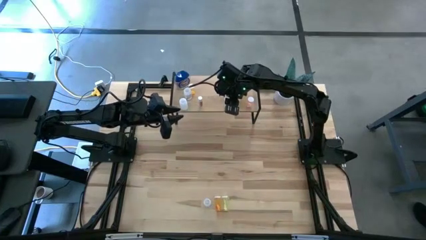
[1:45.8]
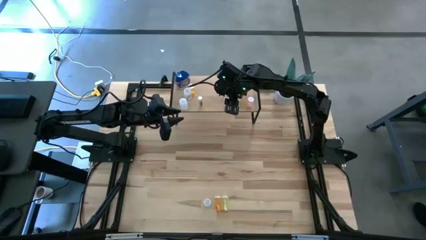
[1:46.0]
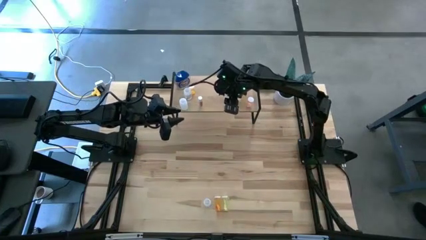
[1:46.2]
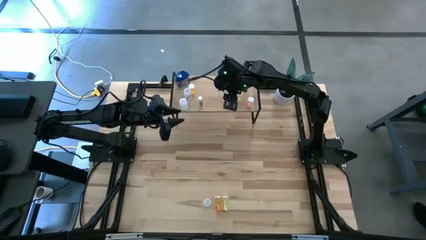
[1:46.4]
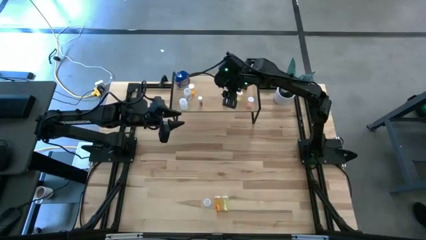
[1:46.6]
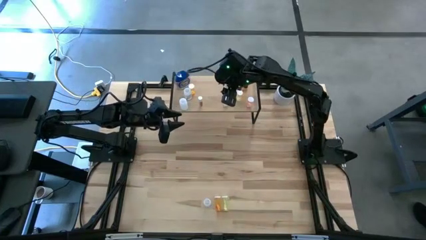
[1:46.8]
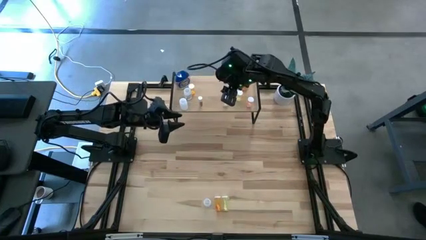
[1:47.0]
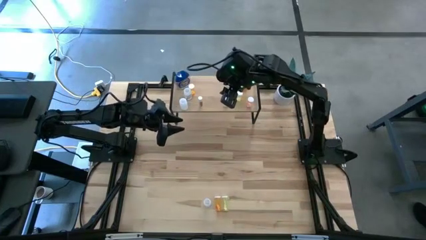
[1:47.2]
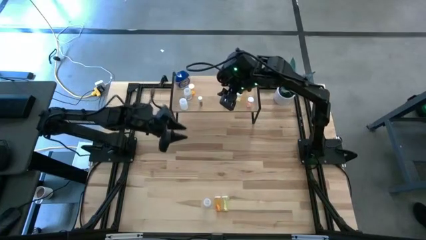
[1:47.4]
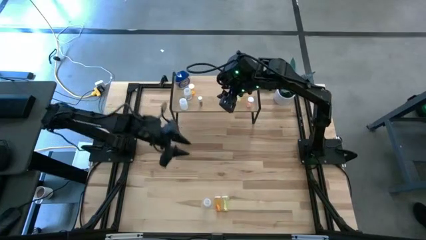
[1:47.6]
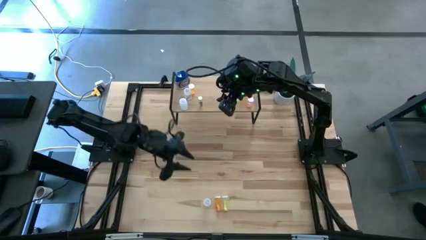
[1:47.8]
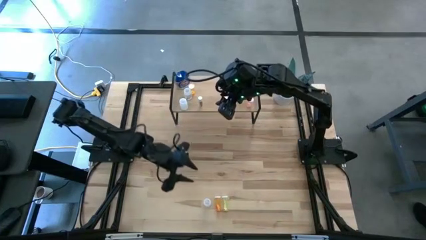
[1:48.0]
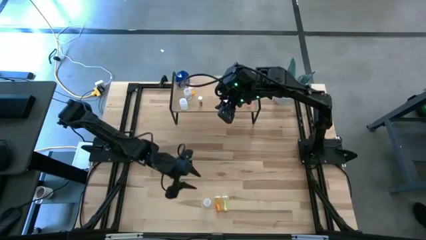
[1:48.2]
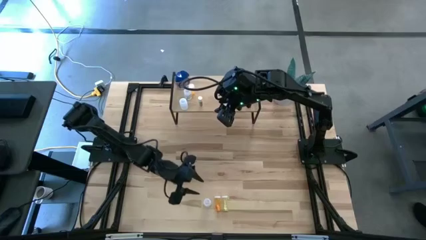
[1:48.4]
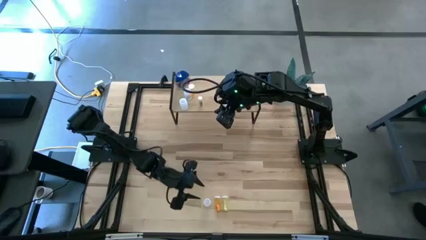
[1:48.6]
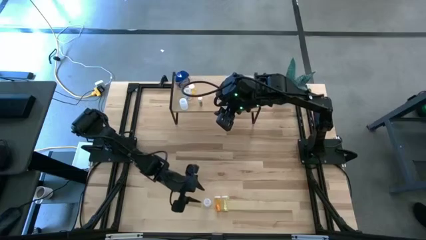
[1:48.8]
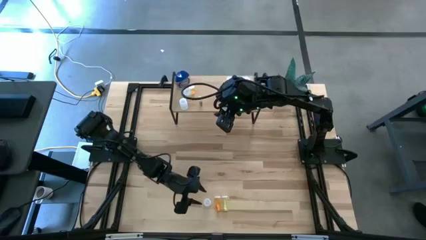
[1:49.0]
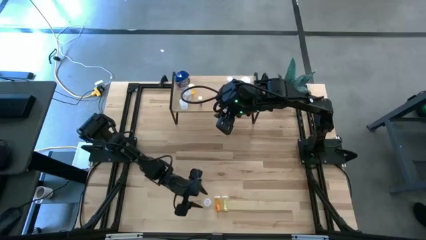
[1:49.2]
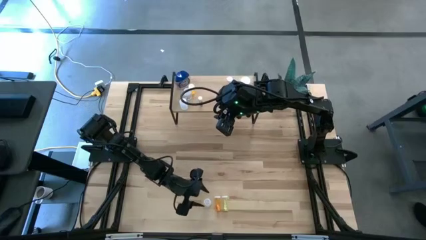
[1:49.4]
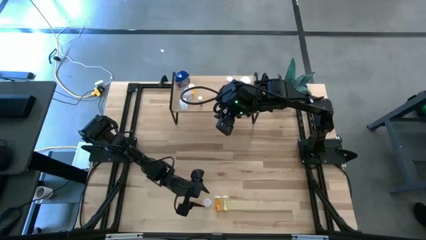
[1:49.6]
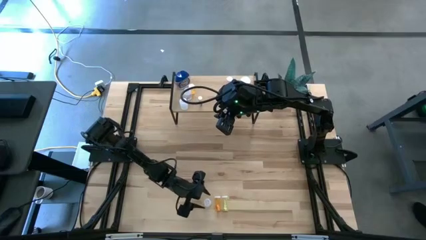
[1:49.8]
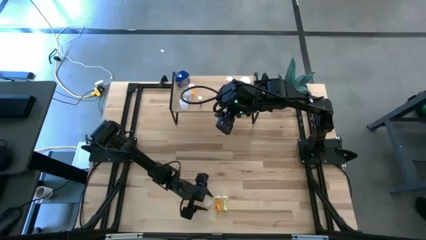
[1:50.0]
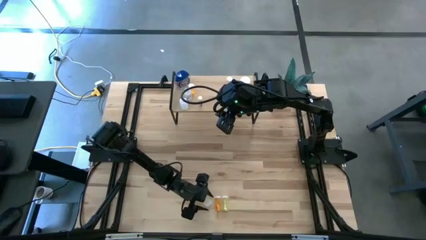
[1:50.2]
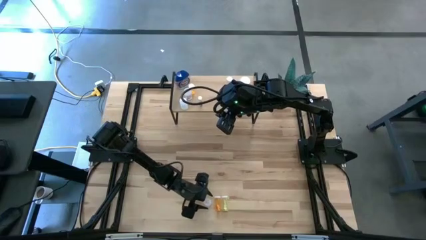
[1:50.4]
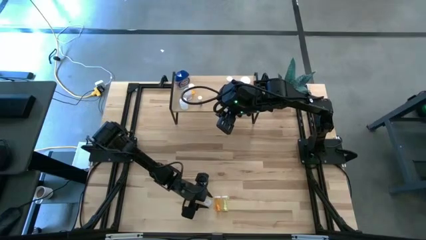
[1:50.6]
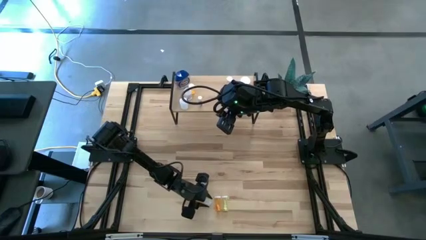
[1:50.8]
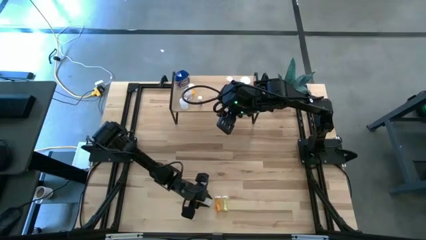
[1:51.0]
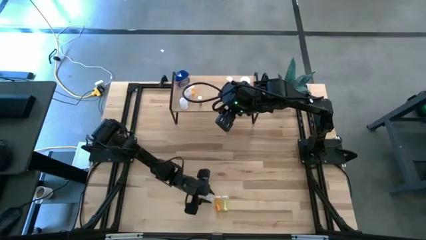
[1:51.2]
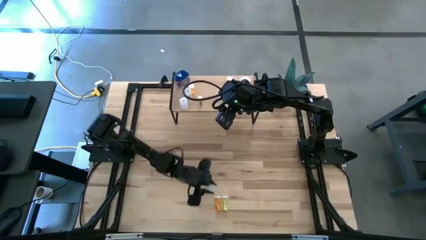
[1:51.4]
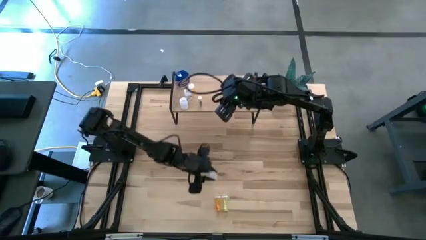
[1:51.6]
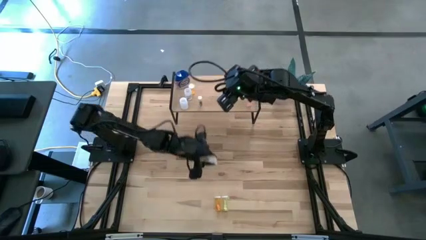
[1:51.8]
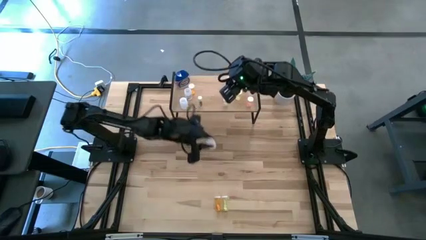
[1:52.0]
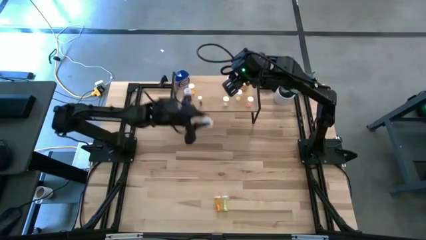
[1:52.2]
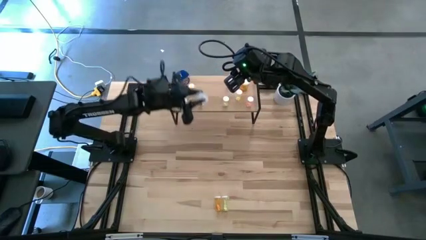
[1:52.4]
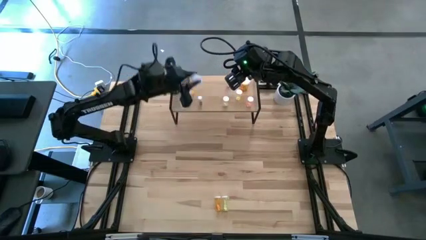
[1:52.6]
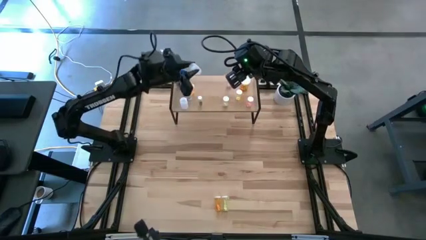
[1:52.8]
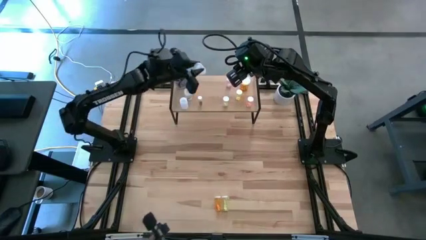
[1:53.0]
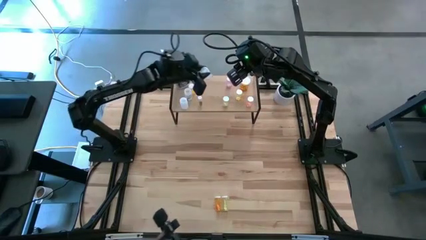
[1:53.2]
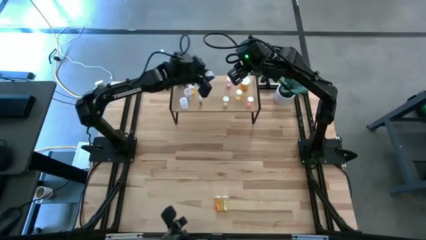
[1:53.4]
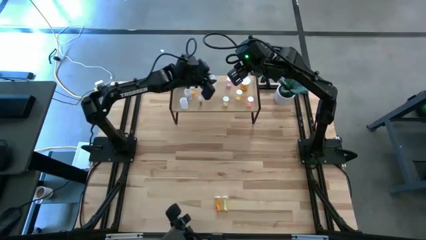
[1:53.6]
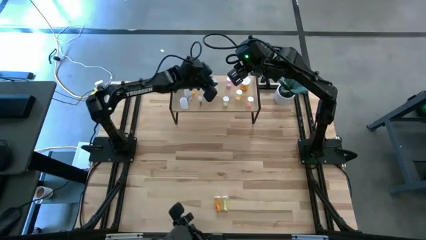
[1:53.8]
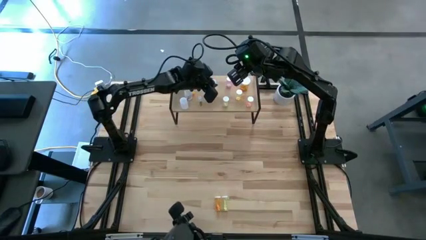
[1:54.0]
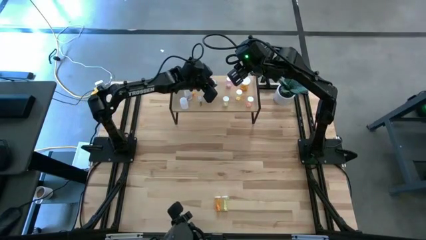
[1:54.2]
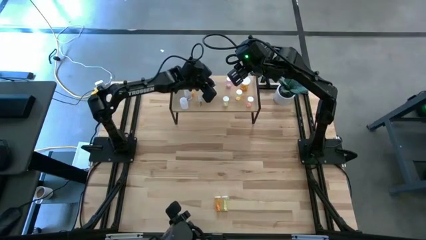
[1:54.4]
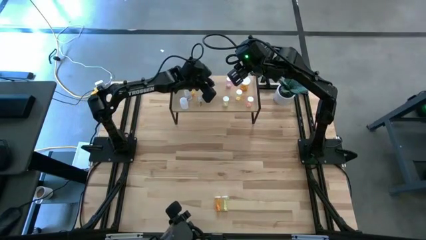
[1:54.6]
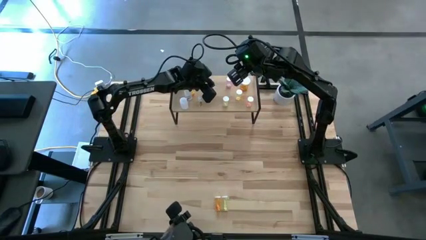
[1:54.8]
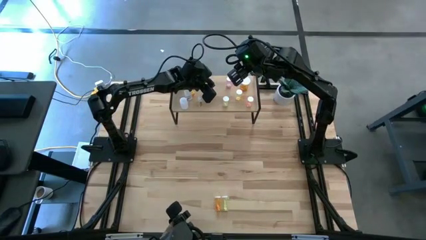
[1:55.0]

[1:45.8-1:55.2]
Task: Pick and place medicine bottles onto shelf by color
Put the big white pill bottle on the shelf

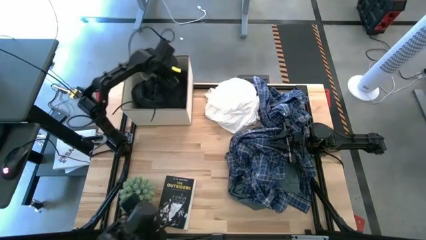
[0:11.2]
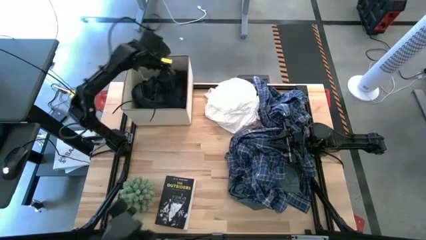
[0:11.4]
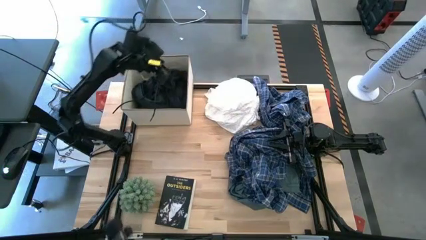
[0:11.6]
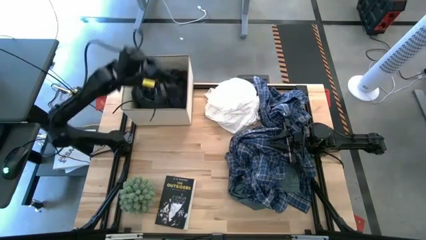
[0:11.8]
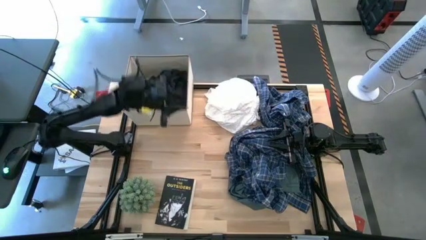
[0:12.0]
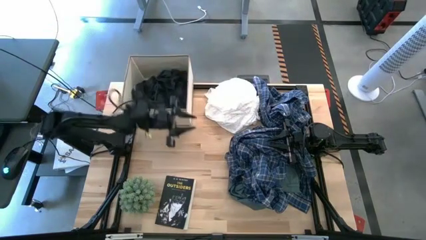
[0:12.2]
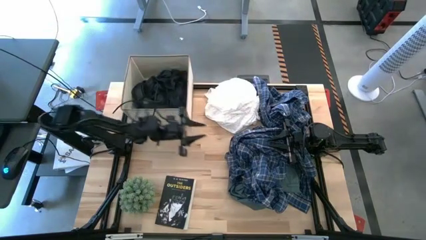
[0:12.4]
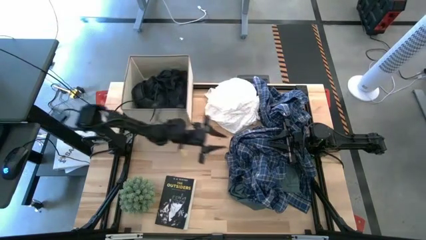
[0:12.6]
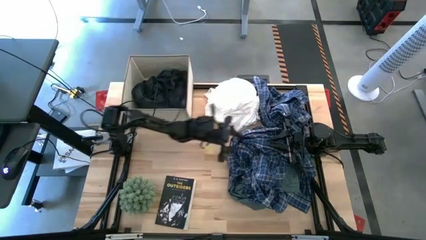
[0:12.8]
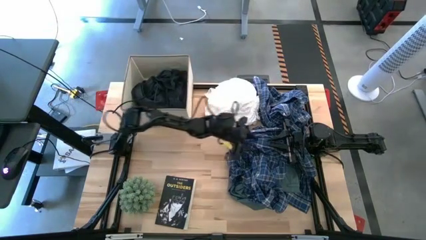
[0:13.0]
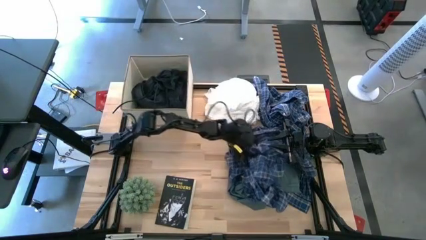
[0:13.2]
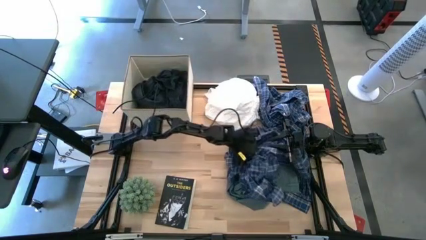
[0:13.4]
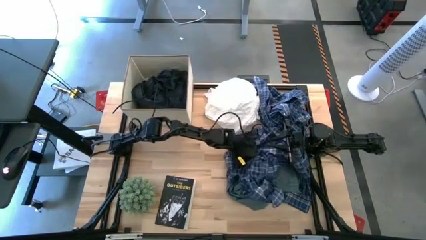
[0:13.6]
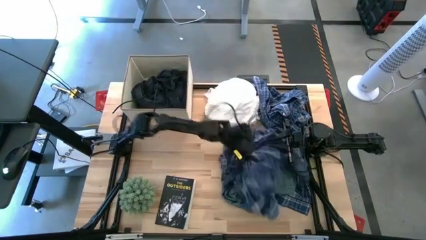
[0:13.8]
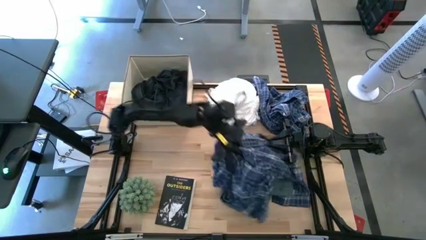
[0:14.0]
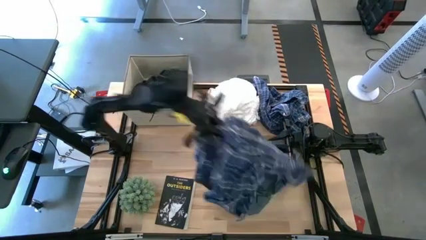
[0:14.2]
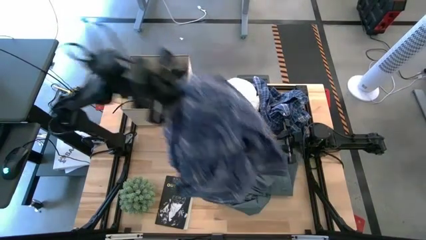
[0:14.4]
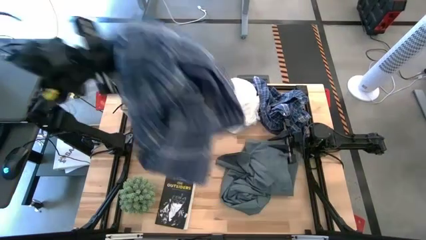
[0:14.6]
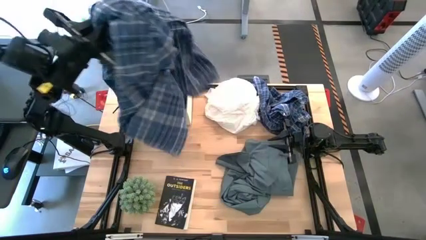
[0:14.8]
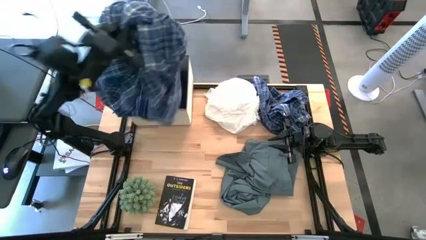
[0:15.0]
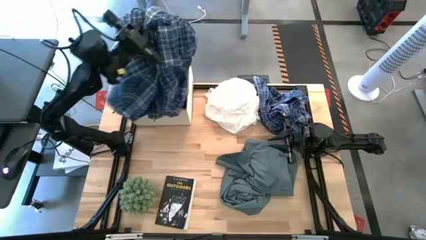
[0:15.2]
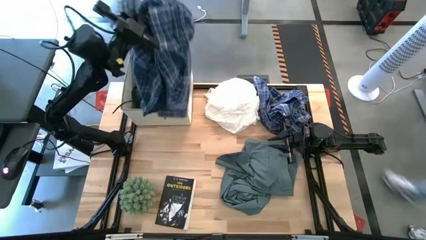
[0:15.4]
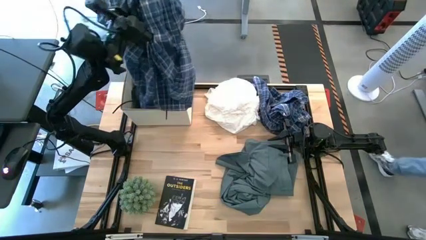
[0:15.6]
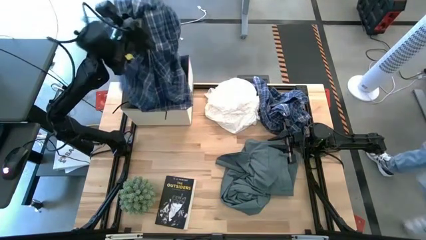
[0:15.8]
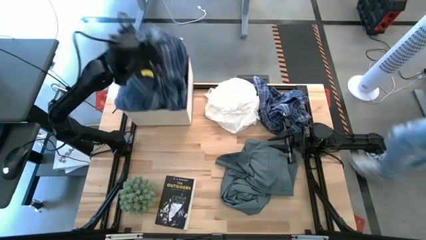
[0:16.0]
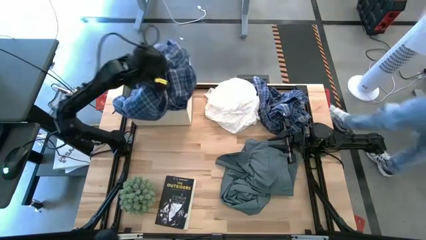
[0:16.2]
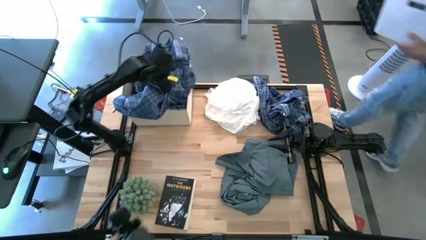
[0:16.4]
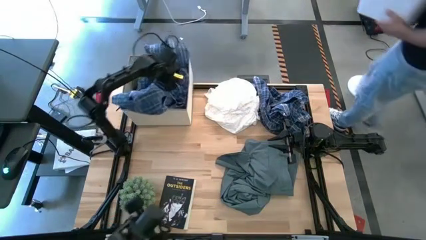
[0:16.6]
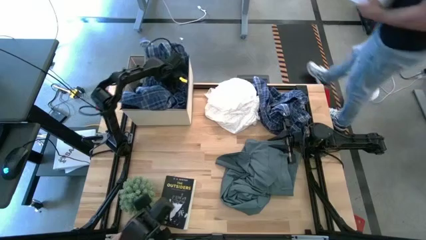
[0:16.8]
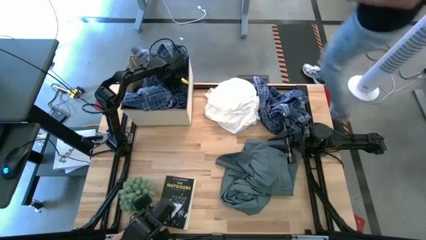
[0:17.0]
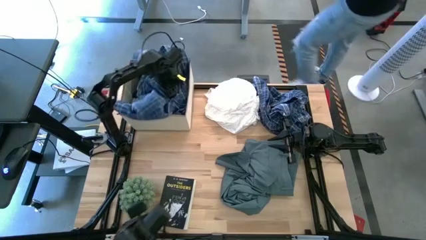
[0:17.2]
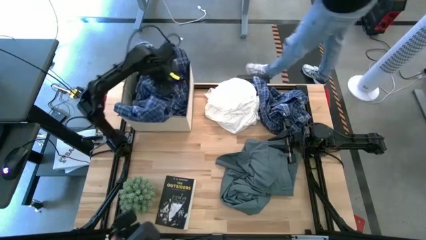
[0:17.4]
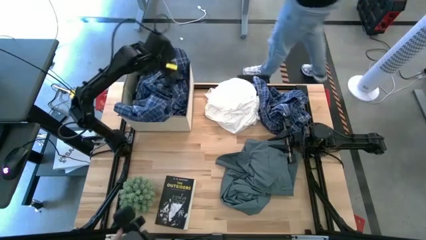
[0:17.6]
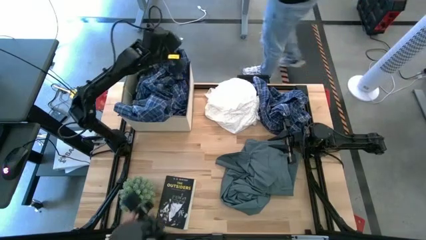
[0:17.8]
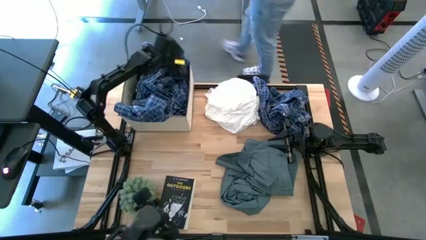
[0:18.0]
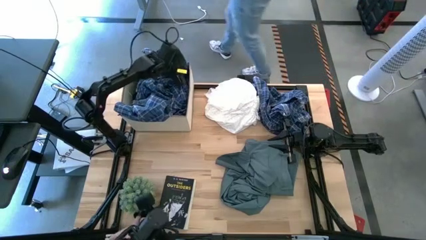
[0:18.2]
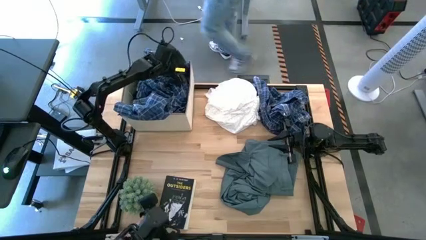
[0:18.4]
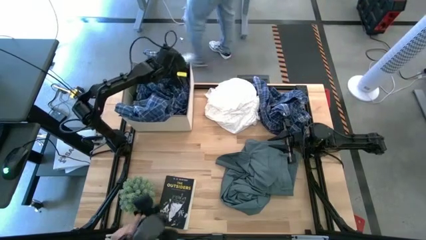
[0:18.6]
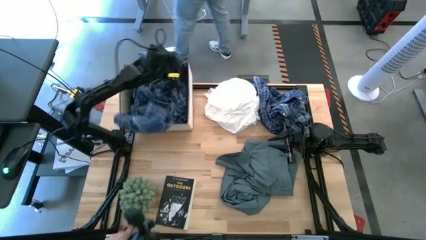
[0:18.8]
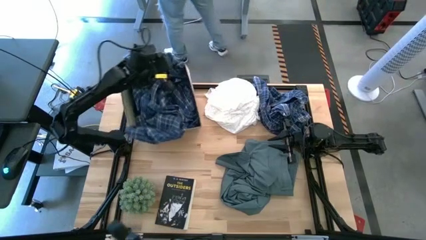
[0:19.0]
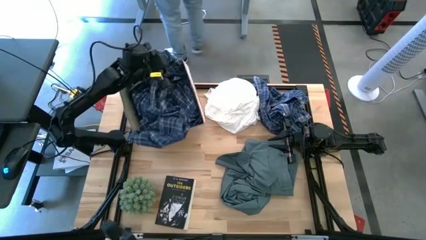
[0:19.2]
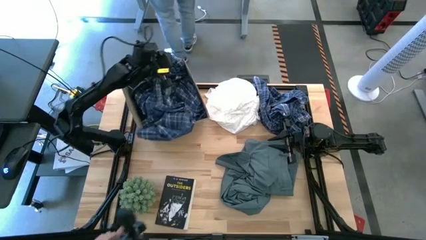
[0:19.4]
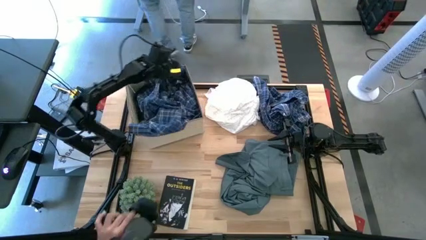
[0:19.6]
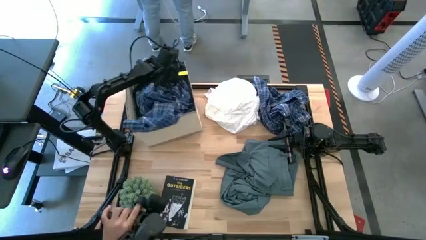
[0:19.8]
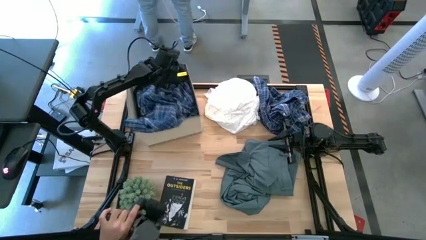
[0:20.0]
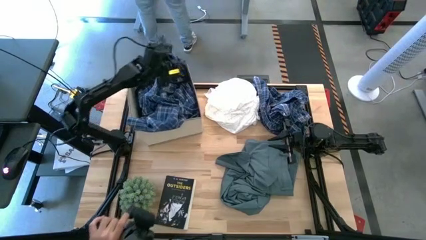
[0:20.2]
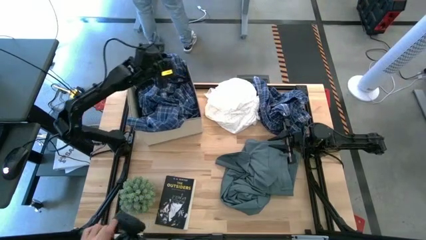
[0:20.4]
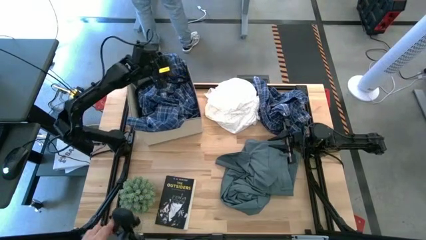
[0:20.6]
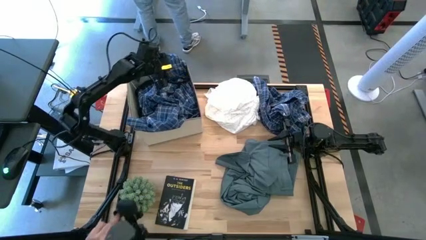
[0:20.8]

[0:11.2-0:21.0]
Task: Sort clothes
Put the bottom blue plaid shirt into the laundry organizer
